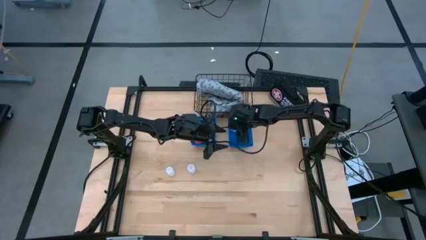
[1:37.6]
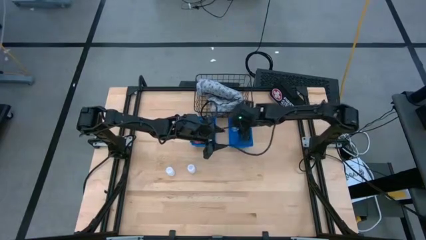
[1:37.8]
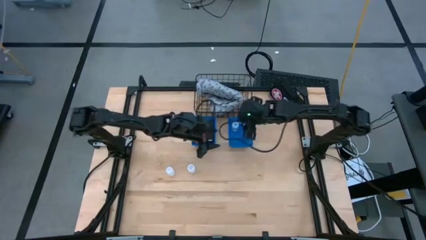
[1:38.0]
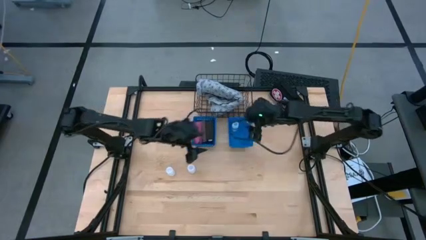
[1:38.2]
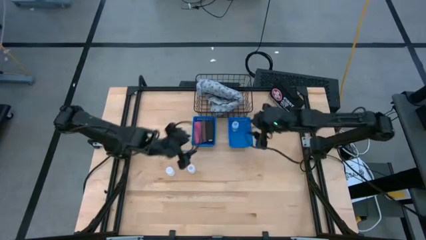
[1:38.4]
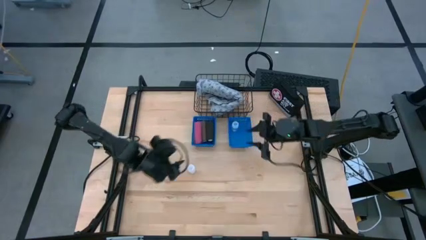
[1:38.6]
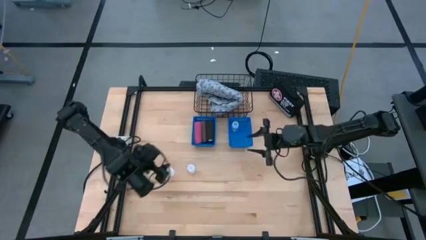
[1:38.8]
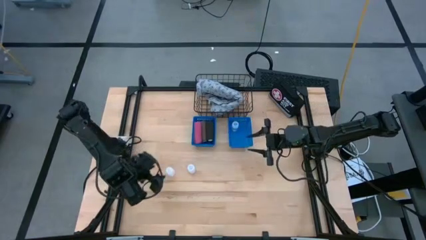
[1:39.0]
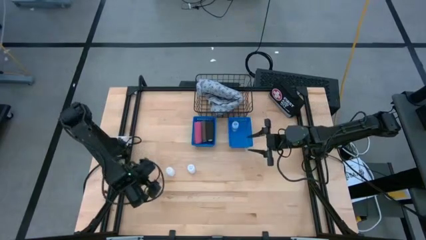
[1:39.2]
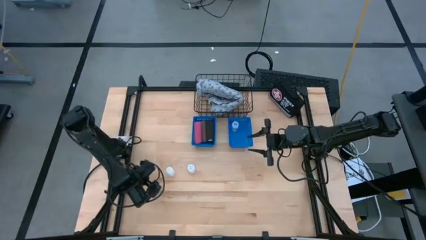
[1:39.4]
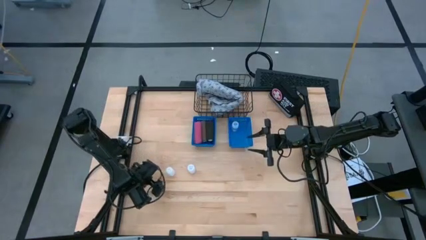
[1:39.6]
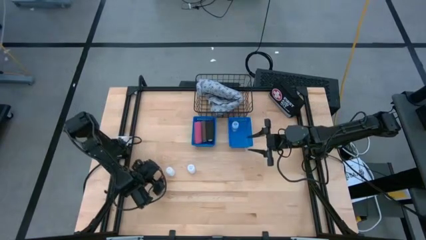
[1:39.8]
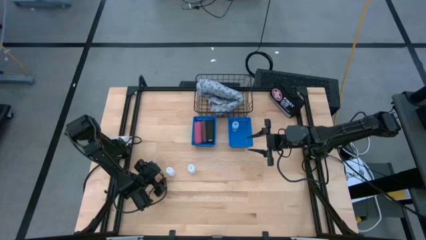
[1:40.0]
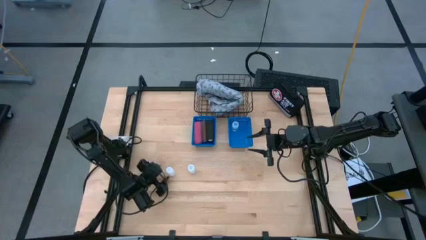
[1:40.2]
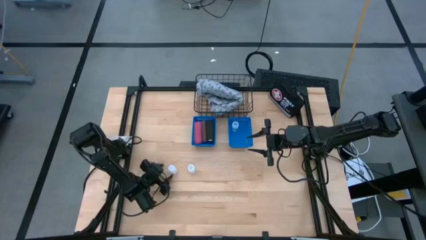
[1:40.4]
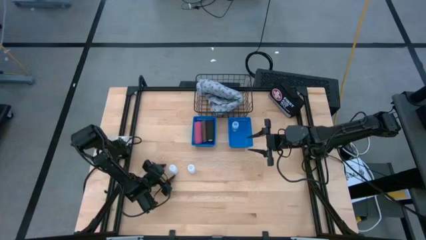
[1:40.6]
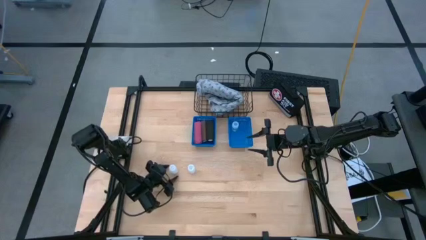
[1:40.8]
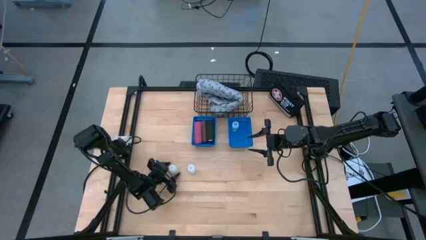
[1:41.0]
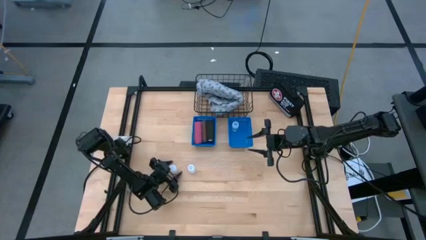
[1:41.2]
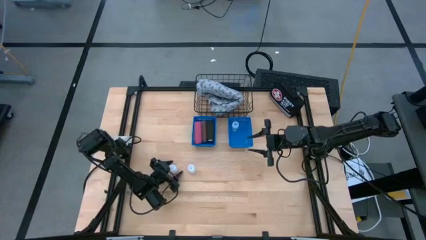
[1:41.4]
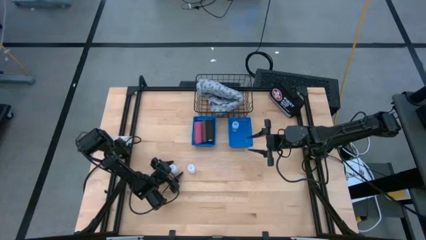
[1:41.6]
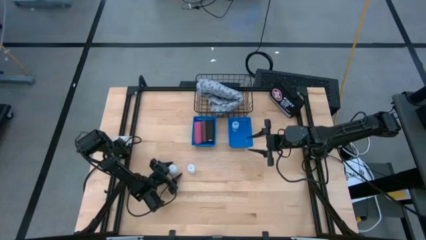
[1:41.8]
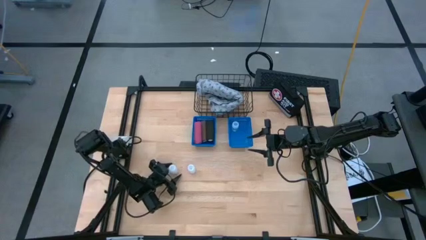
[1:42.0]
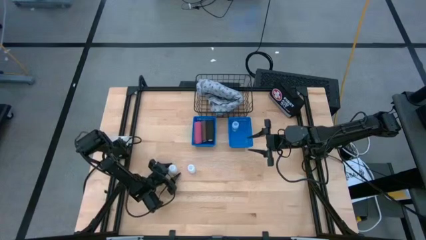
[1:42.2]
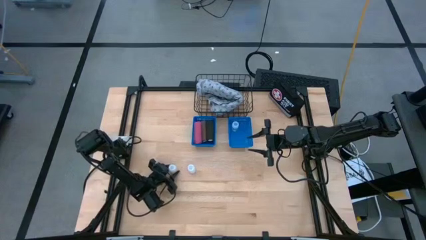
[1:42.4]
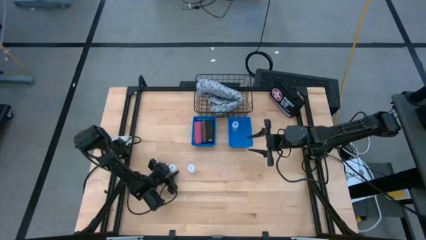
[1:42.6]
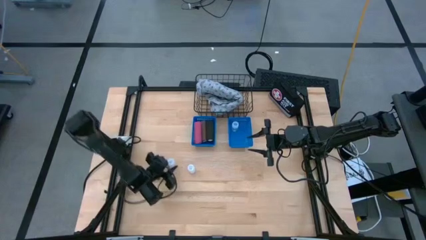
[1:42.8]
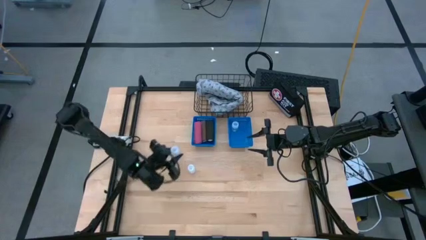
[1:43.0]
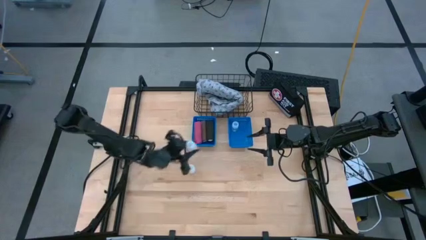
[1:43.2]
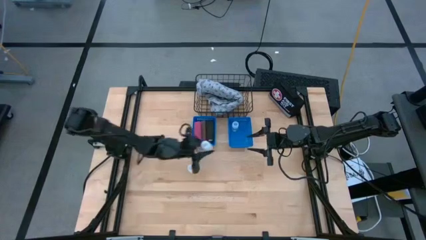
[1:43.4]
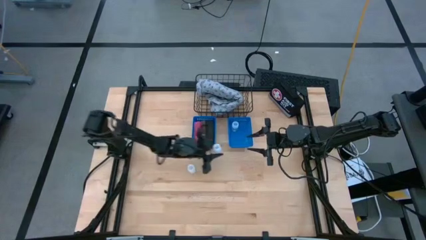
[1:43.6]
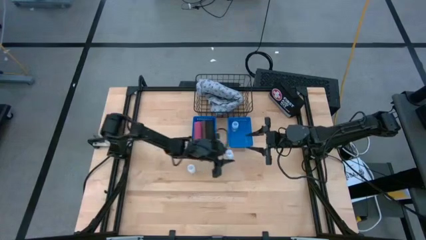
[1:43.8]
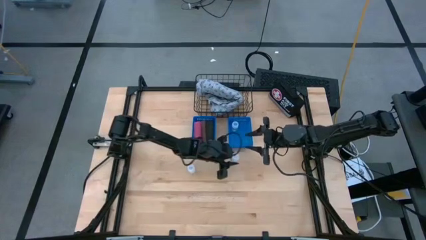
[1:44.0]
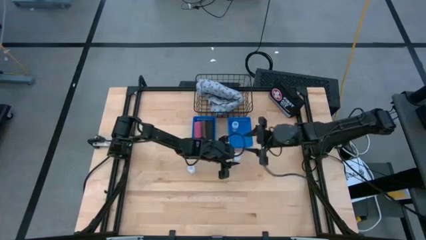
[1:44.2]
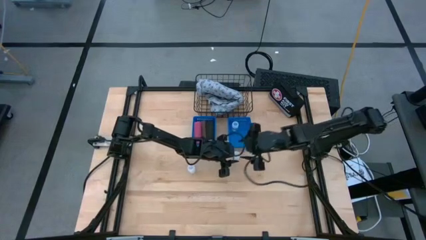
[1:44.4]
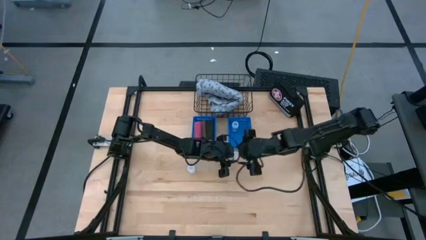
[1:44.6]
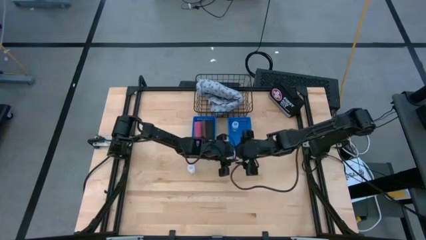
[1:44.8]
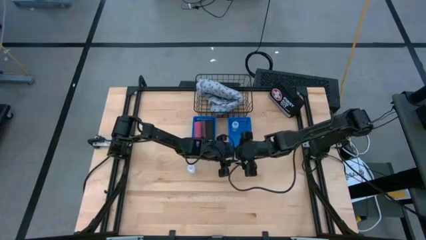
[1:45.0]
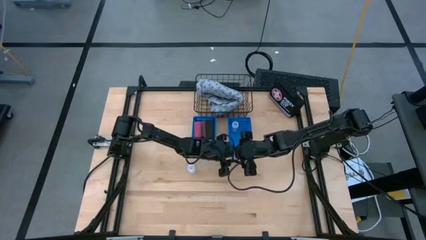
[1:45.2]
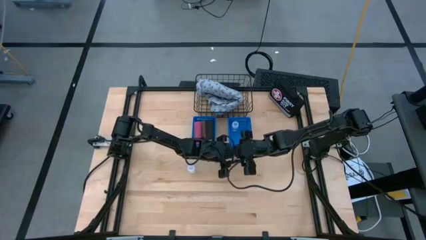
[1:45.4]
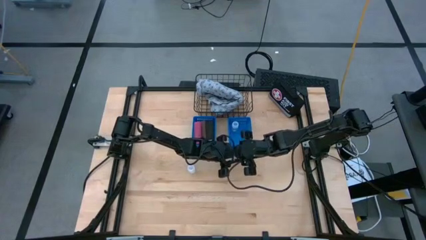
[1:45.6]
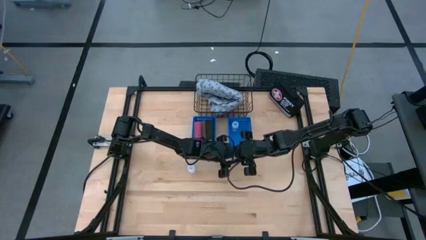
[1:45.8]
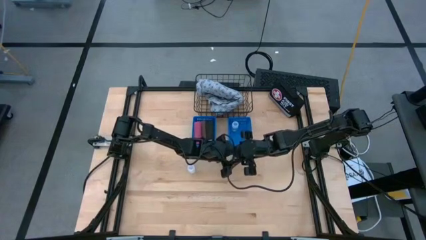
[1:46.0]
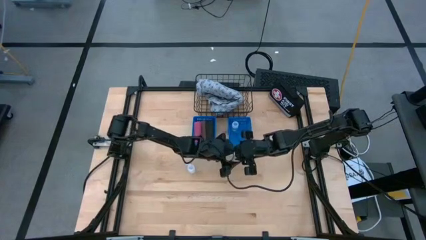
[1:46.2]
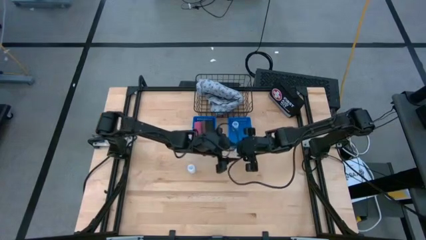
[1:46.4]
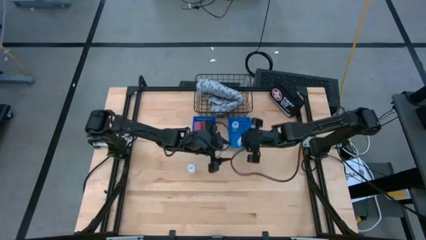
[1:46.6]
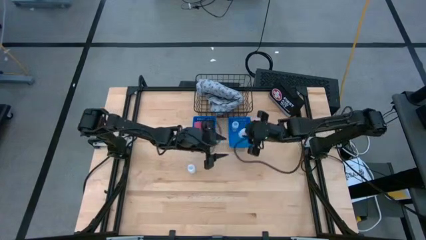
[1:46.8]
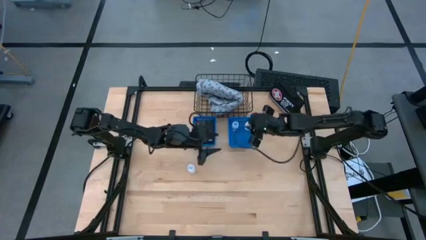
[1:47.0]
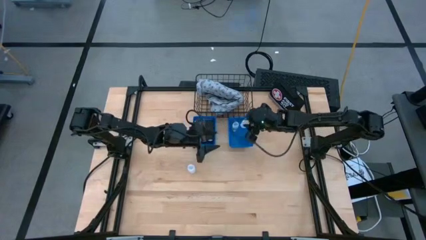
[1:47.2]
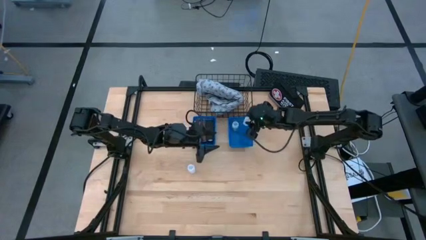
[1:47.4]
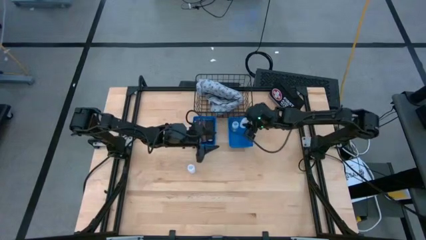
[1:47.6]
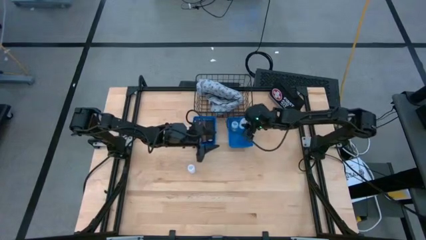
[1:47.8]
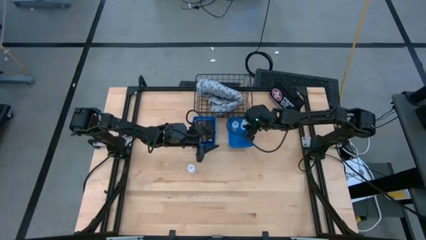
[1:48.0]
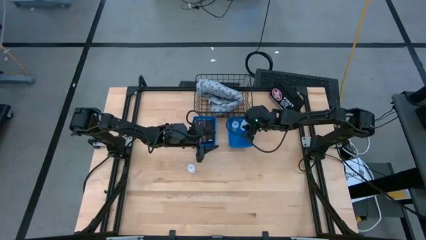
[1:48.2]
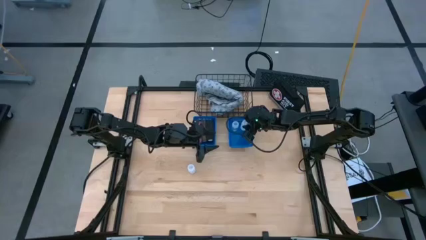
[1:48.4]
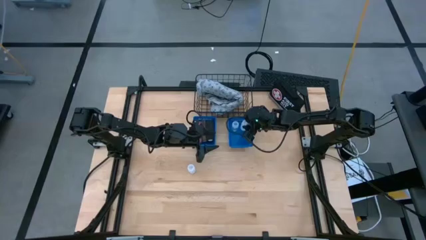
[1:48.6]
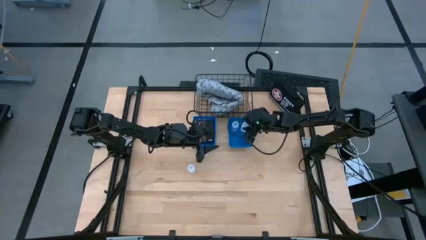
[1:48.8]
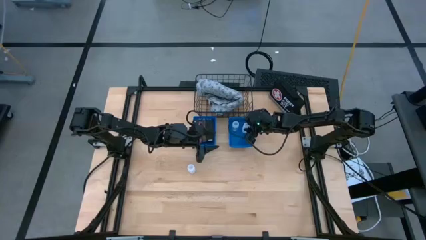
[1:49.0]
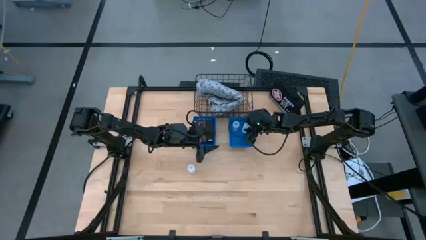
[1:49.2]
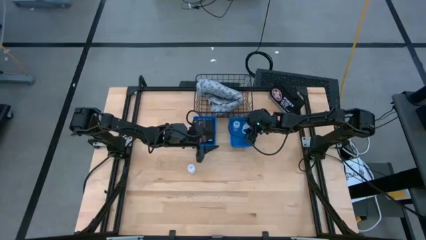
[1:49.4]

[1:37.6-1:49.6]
Task: Pick & Place Medicine items
Put the left white pill bottle into the right blue bin
